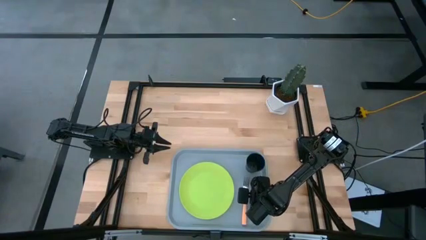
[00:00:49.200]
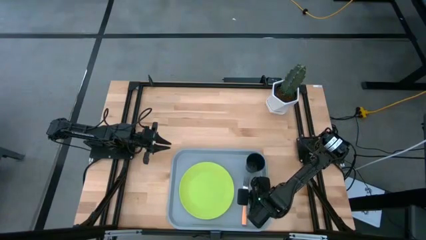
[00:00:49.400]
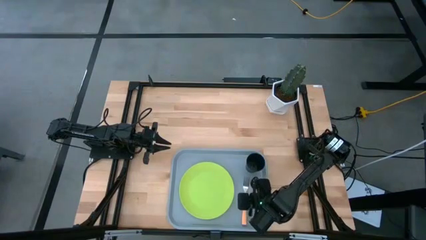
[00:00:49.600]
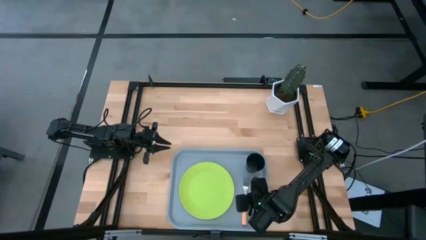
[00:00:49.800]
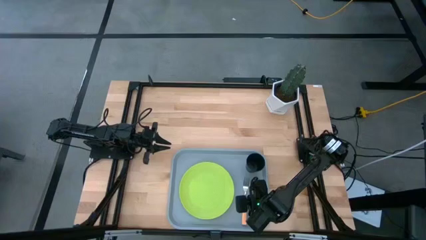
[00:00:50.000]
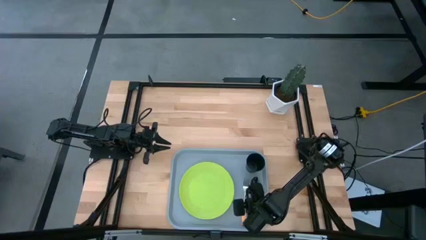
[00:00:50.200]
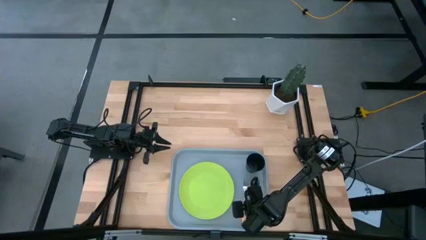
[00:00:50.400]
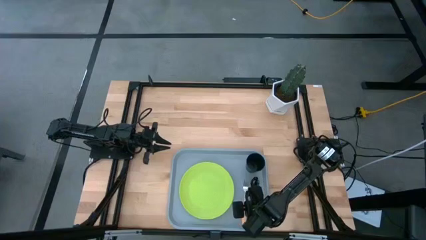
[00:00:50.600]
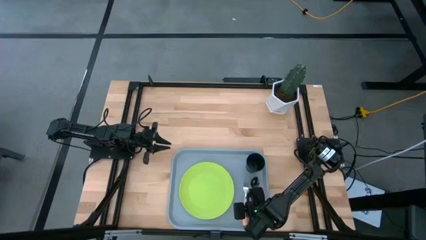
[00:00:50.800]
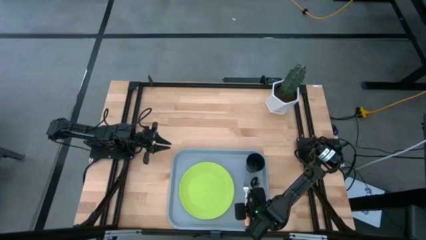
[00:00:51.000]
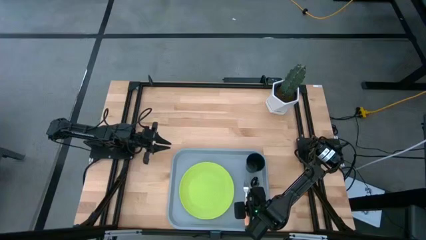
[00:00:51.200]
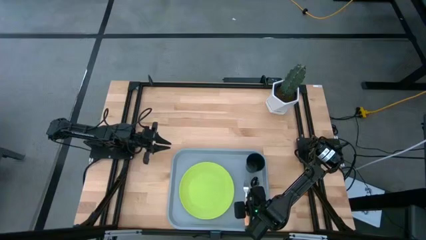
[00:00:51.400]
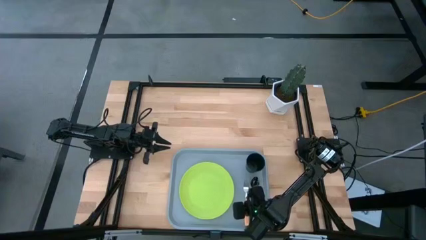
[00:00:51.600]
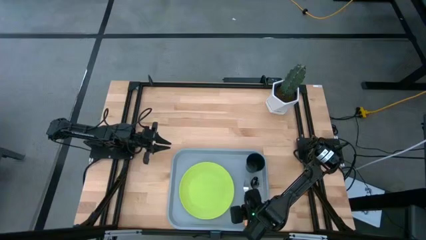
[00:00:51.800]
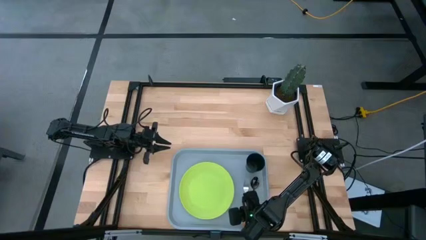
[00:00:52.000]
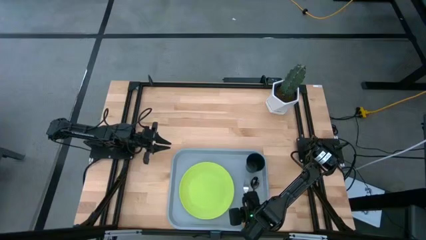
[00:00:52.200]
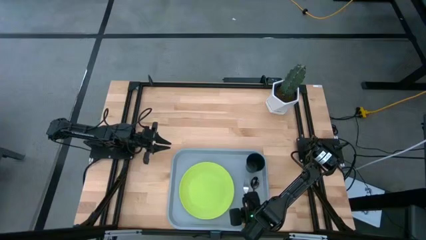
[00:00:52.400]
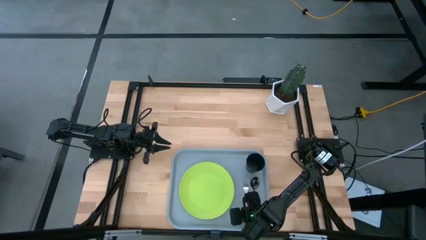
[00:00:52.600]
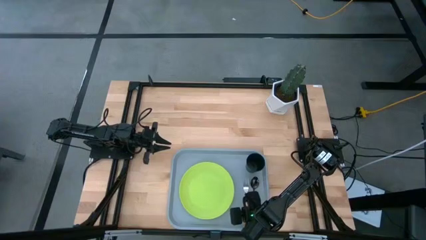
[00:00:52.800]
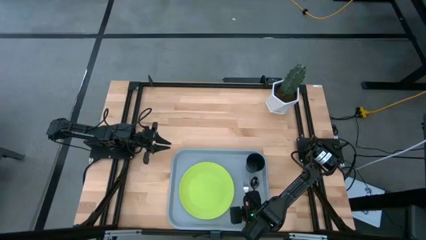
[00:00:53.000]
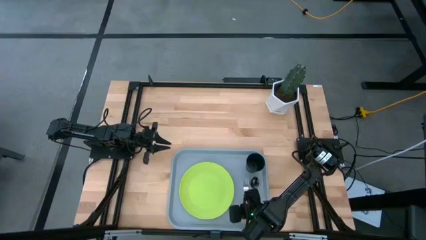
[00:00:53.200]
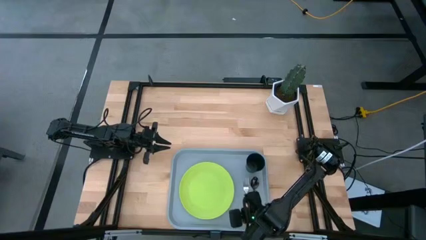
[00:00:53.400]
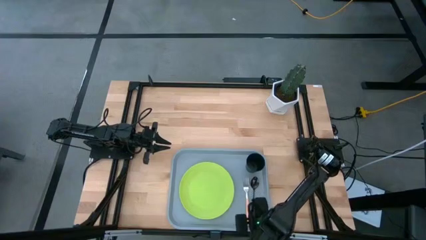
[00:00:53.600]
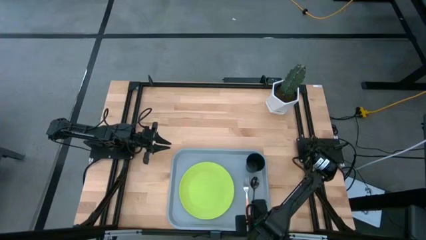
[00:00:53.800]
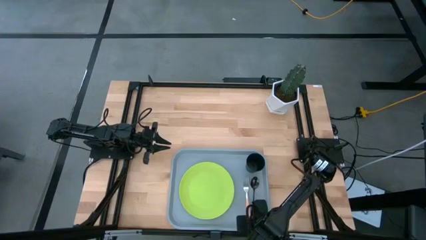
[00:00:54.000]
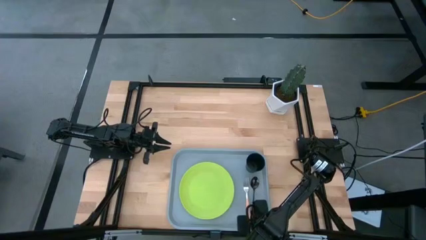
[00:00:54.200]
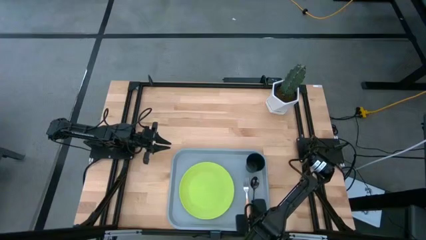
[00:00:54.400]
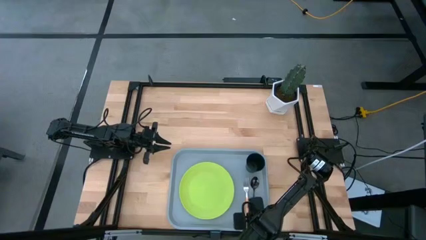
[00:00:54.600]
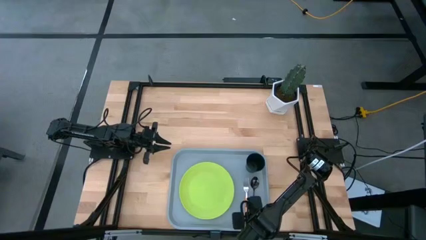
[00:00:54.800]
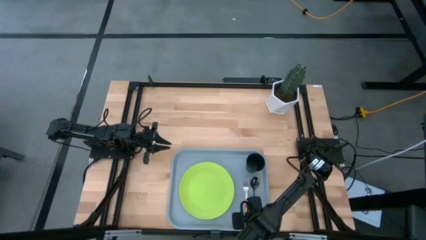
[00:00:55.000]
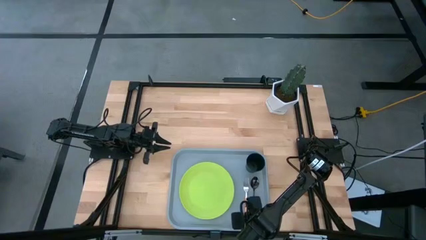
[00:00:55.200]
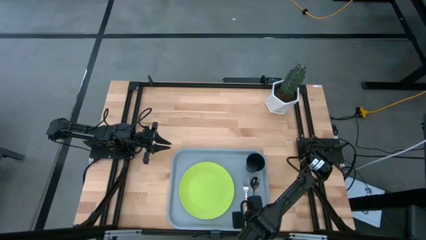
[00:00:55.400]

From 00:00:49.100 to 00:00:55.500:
Task: Pick and place plate/cup/fork/spoon on tray
Adjust the orange fork

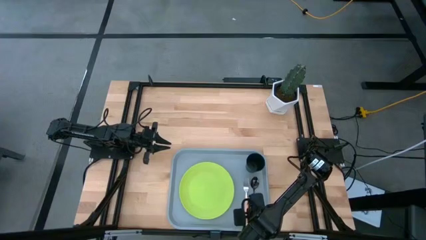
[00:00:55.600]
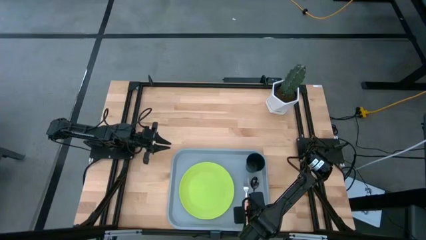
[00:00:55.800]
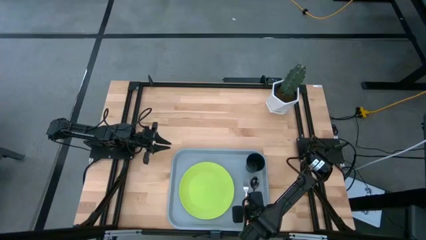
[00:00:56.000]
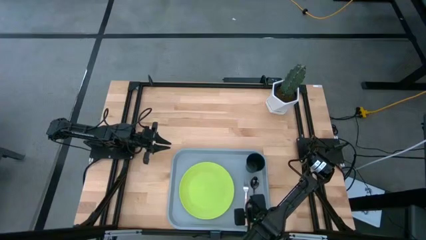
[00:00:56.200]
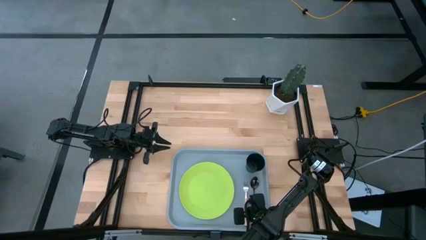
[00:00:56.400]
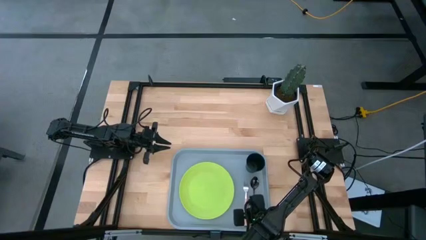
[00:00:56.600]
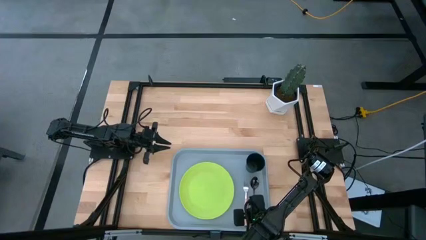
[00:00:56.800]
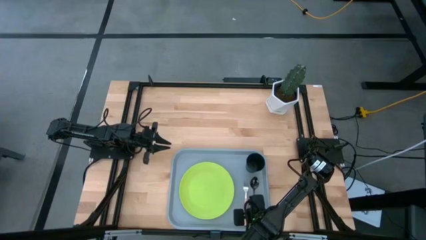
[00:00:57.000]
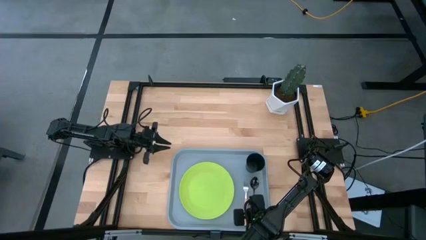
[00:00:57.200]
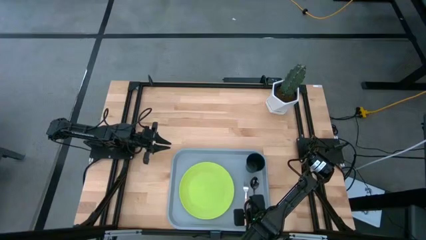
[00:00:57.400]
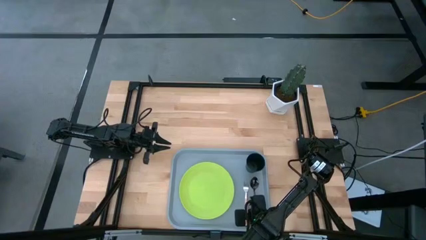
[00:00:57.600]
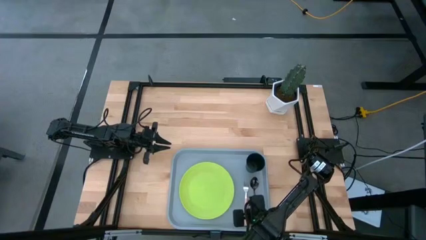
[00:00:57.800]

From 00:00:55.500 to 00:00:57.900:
Adjust the black spoon

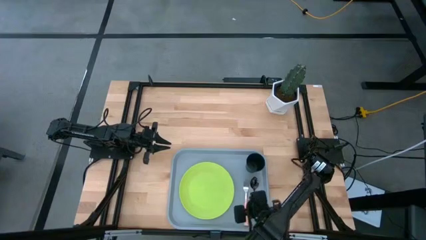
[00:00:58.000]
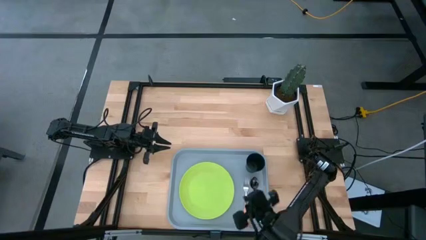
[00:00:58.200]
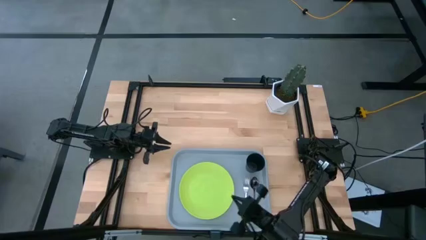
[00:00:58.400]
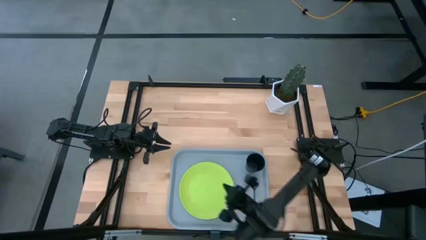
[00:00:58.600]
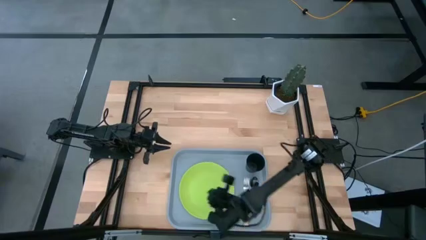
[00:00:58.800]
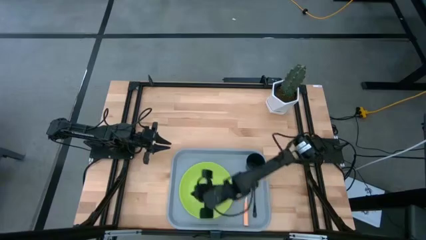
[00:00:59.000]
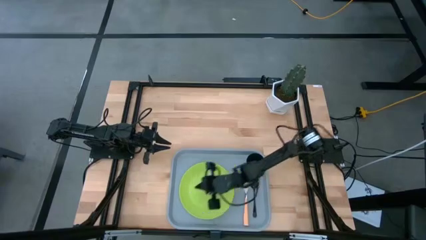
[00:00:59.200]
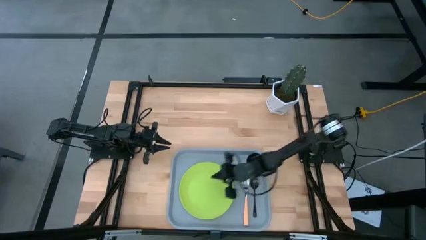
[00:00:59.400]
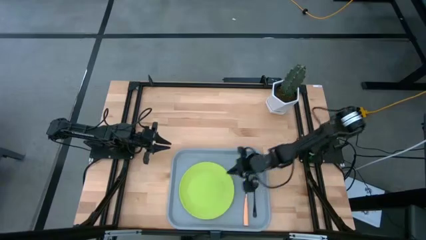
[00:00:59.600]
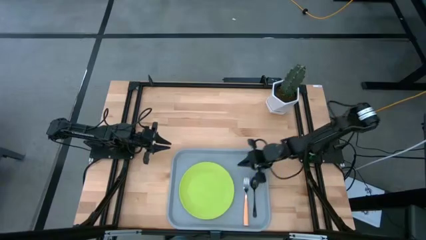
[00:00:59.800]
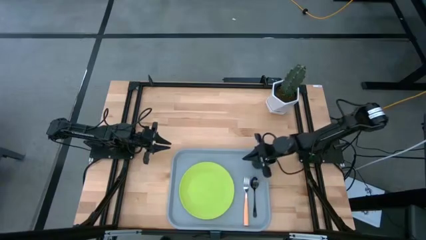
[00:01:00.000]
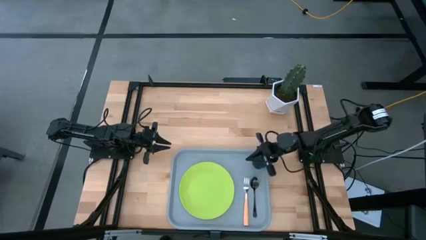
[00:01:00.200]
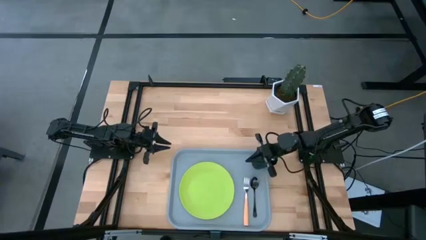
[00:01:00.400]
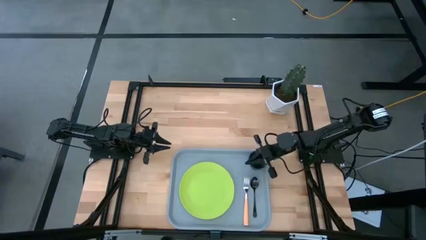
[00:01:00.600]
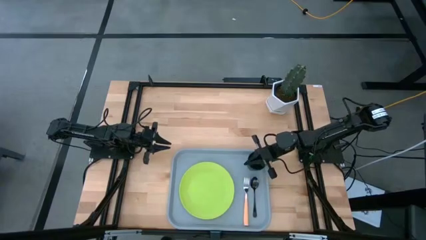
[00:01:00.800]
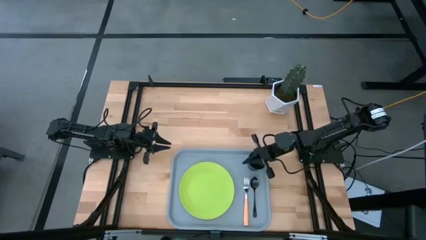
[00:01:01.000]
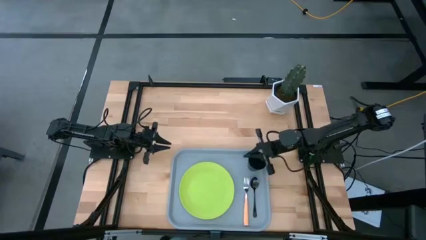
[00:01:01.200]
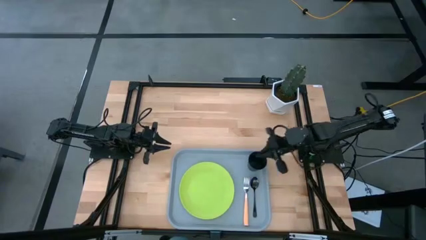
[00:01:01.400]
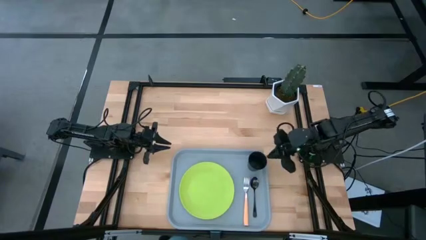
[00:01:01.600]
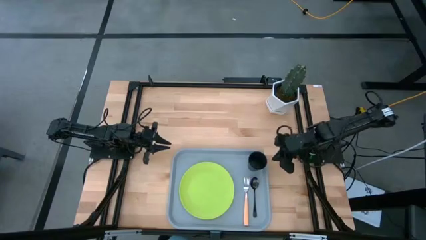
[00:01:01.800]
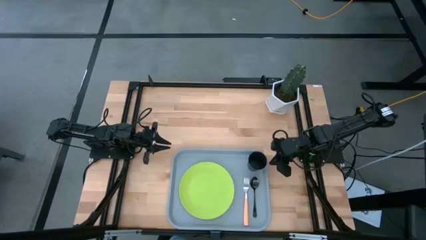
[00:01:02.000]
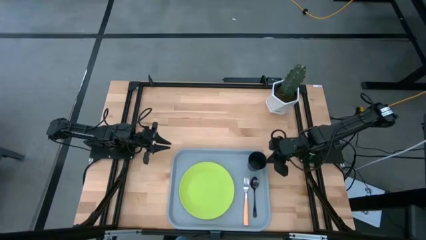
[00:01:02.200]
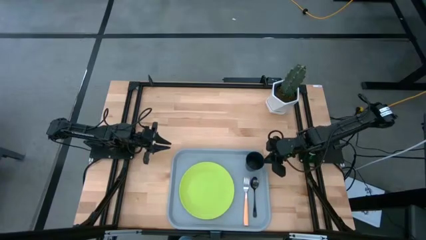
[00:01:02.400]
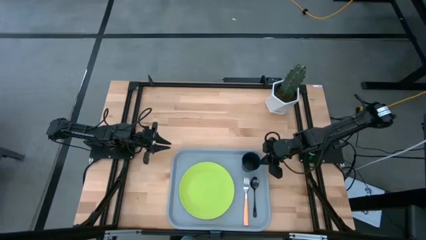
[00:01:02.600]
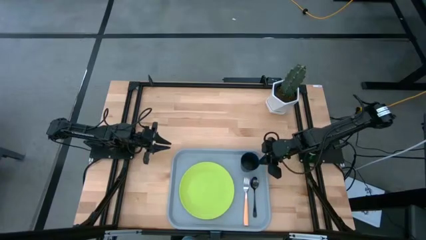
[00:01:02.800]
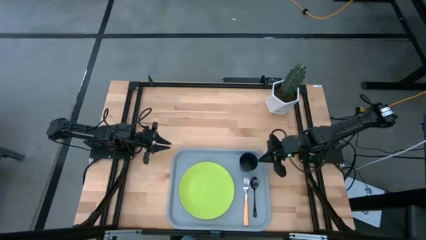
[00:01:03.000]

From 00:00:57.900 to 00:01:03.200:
Adjust the black cup

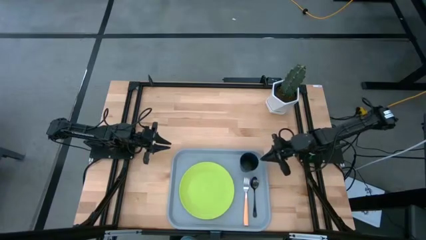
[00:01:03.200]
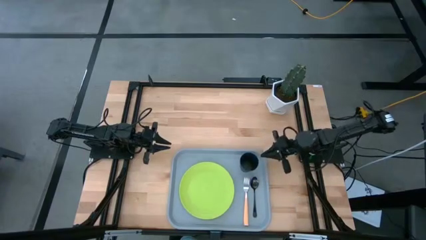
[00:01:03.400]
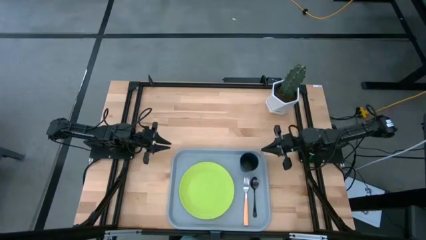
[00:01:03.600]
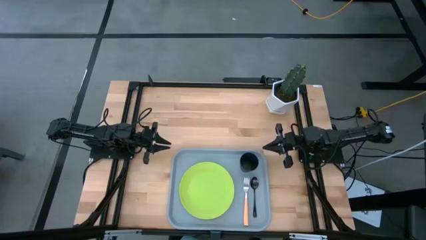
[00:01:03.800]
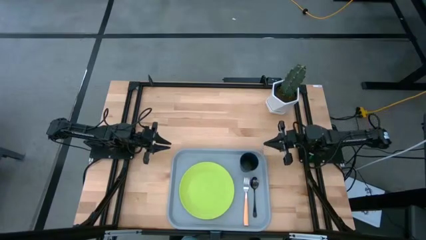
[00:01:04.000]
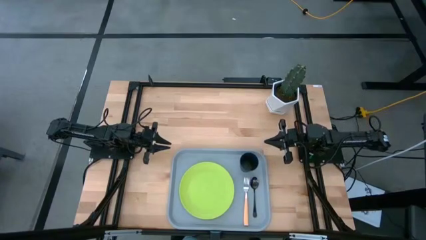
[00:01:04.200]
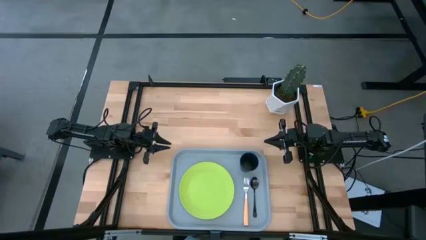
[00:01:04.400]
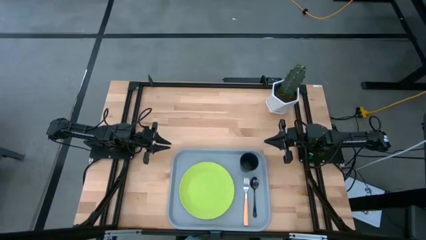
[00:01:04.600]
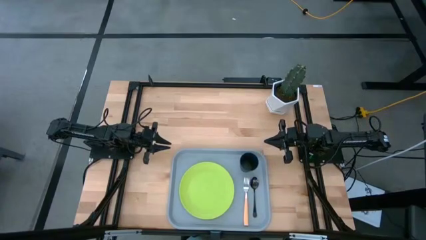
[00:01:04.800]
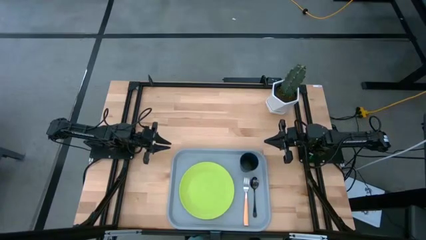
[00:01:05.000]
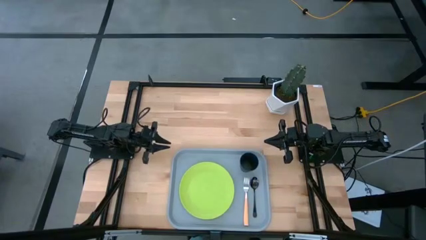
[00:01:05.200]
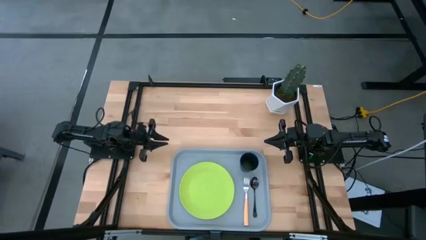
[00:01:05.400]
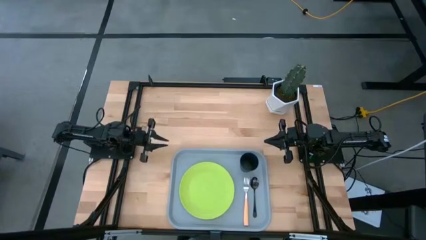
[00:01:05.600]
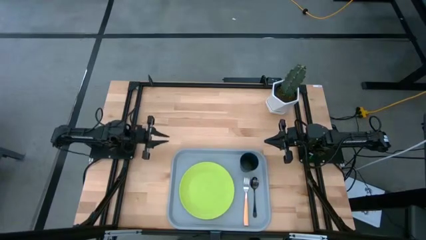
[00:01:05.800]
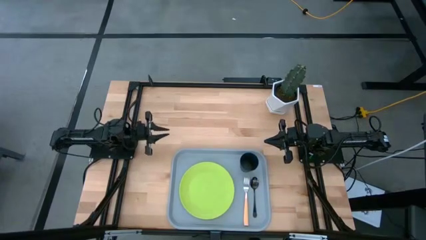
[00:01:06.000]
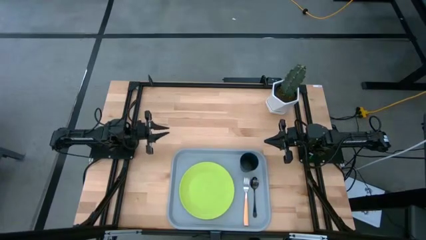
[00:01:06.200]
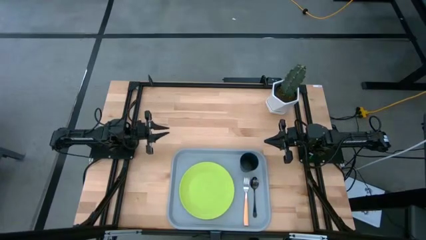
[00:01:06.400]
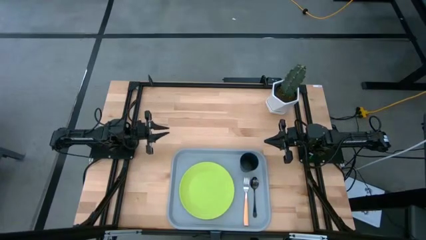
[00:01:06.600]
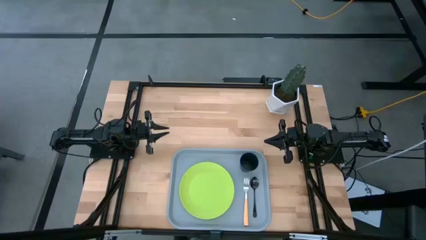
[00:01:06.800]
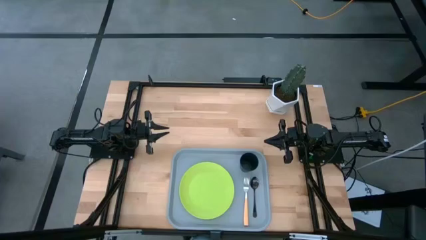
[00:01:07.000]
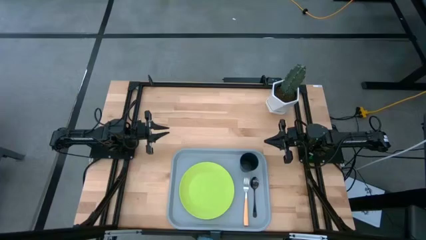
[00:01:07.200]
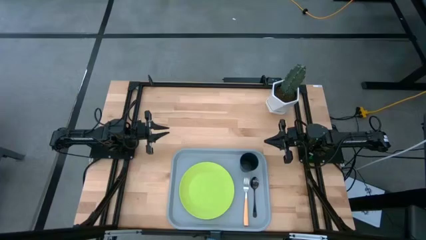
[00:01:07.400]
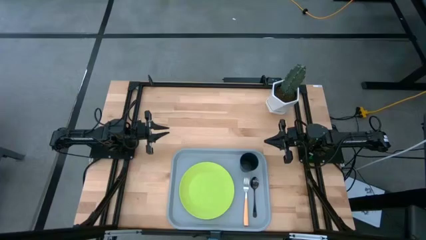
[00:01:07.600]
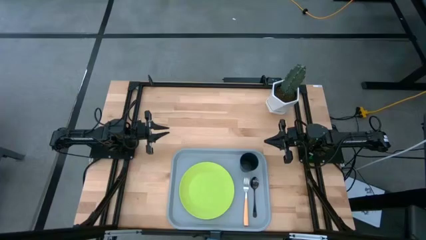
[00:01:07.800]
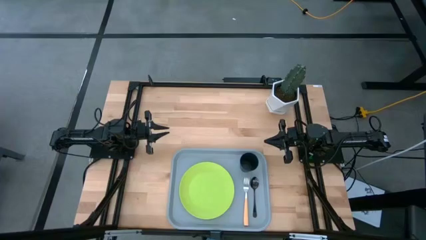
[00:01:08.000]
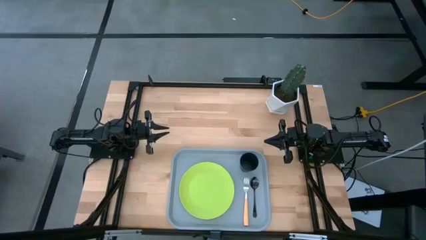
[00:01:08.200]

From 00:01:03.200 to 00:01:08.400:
Return to Home Position
